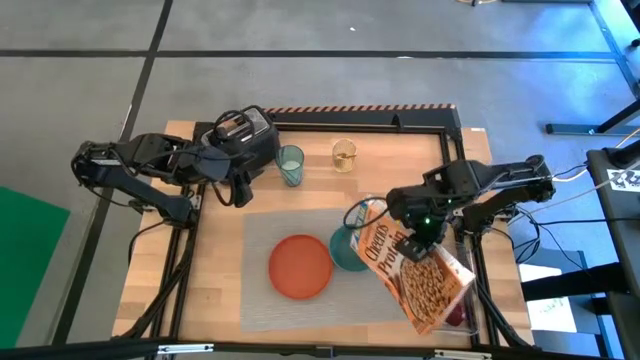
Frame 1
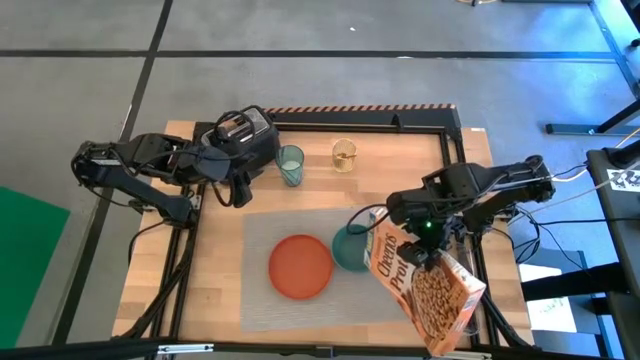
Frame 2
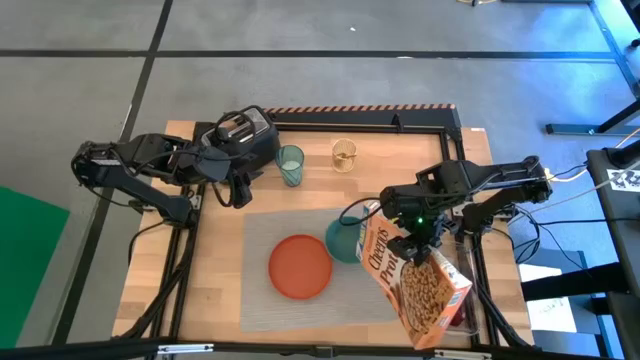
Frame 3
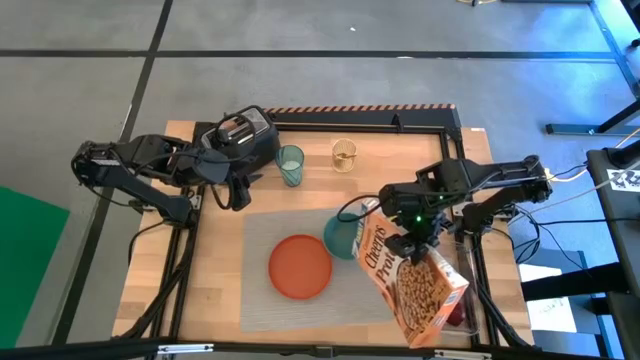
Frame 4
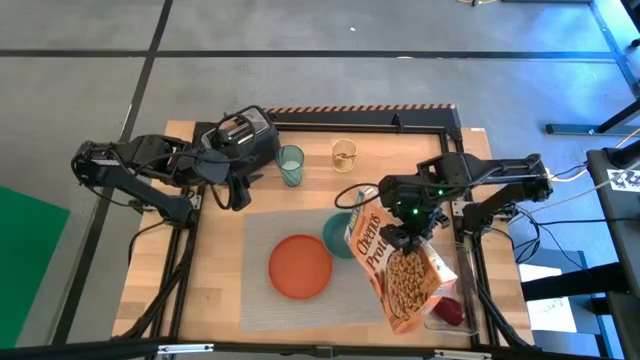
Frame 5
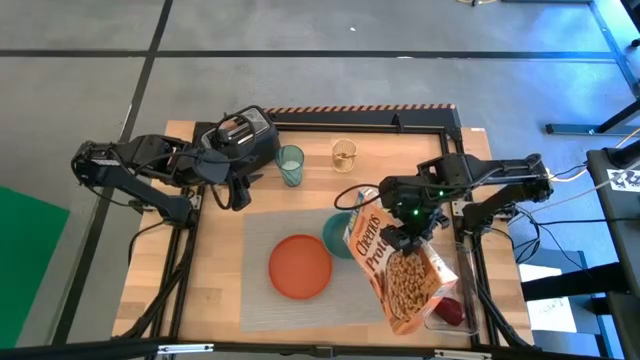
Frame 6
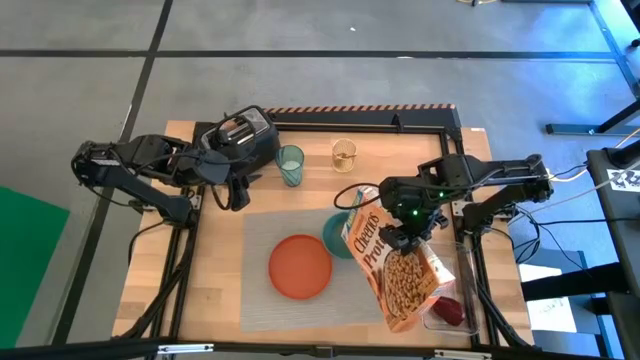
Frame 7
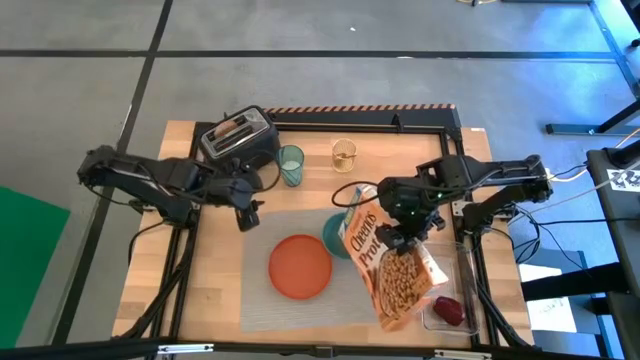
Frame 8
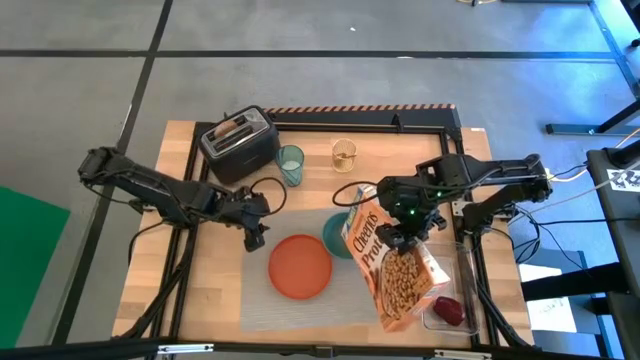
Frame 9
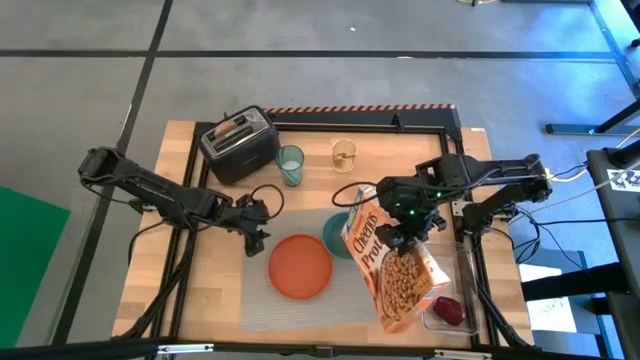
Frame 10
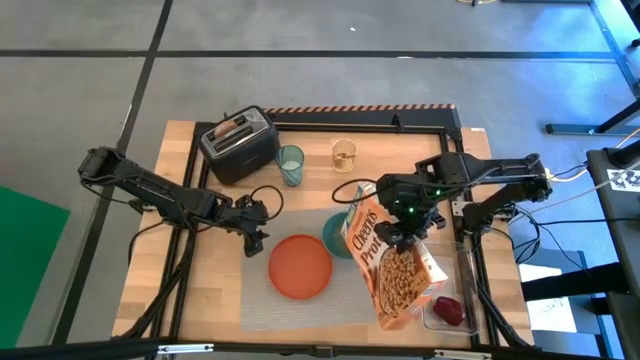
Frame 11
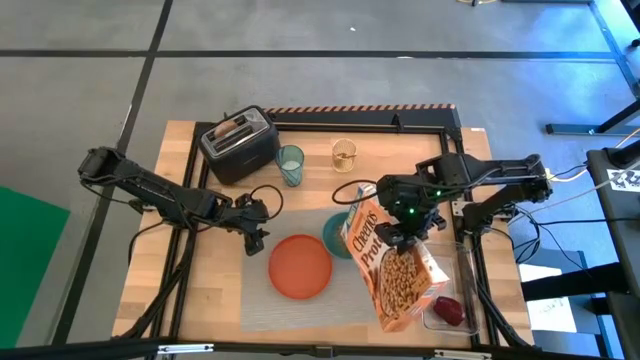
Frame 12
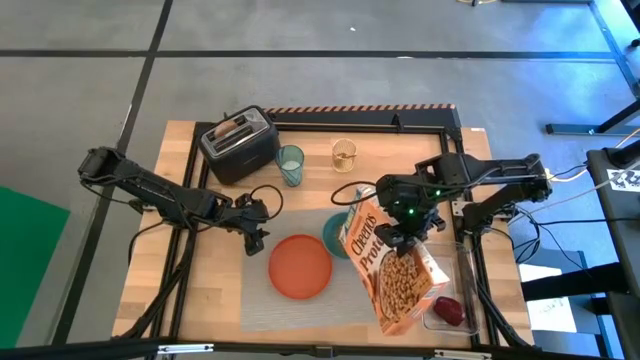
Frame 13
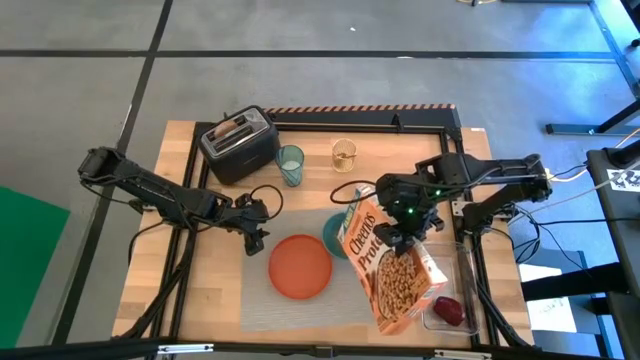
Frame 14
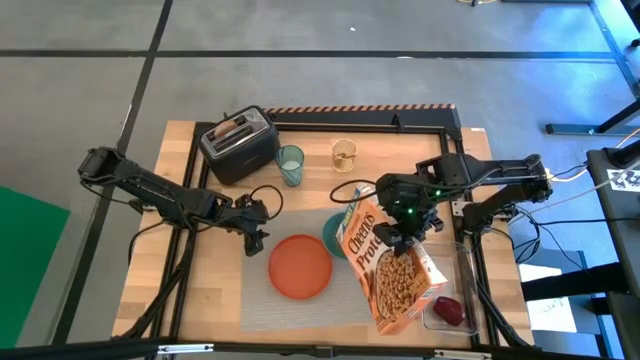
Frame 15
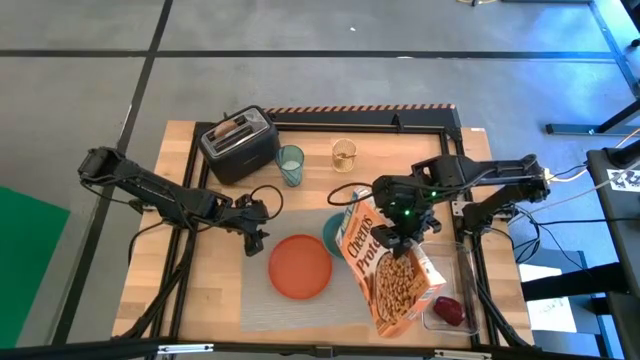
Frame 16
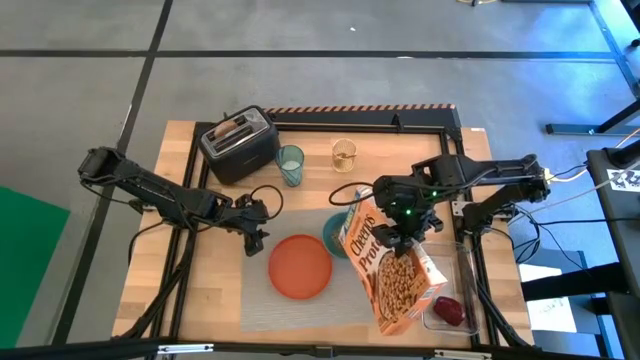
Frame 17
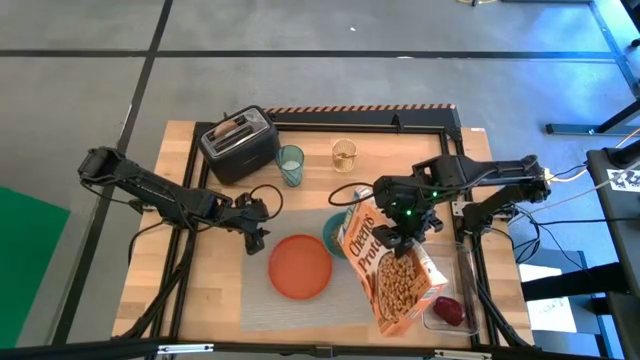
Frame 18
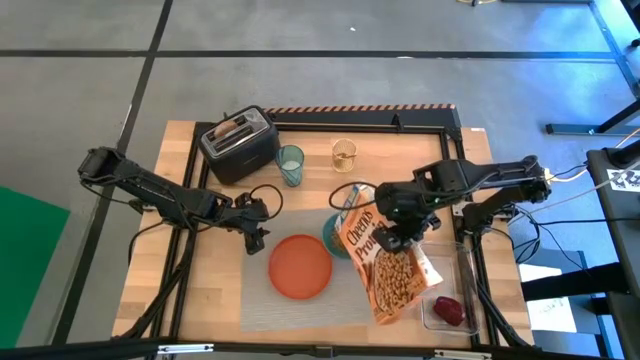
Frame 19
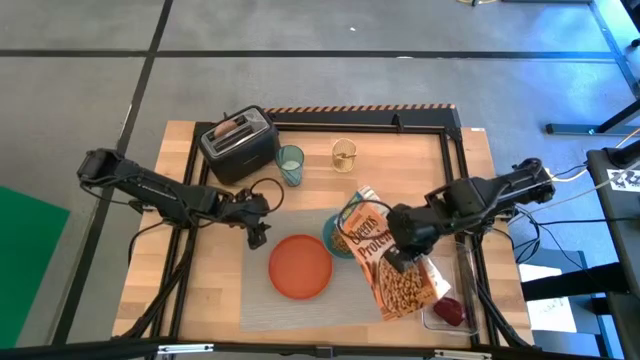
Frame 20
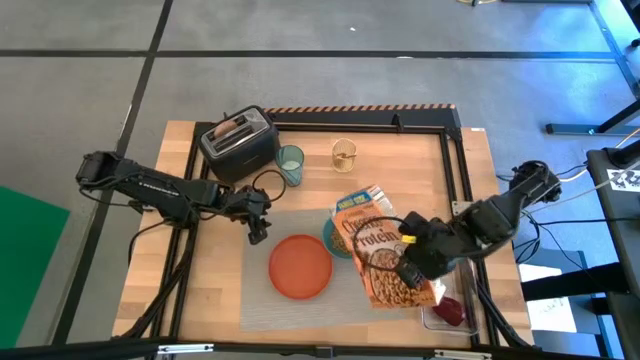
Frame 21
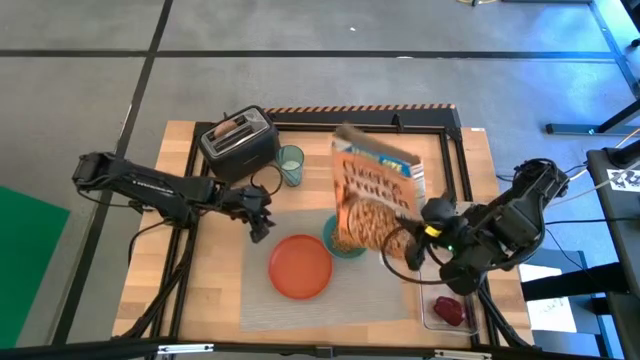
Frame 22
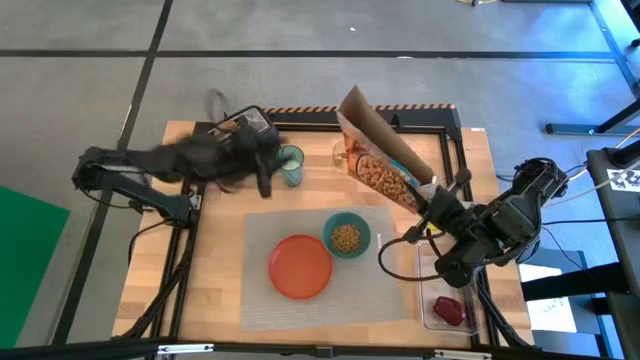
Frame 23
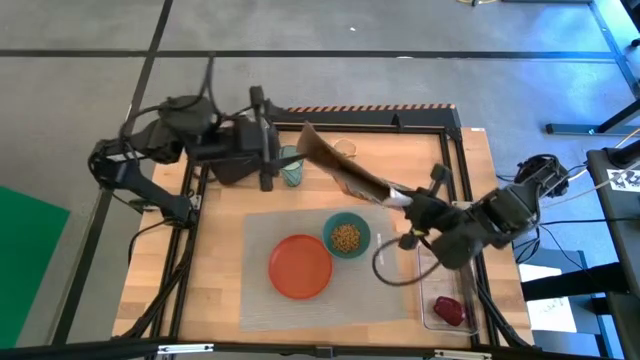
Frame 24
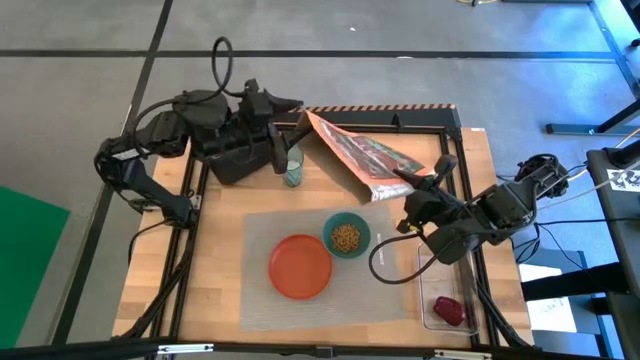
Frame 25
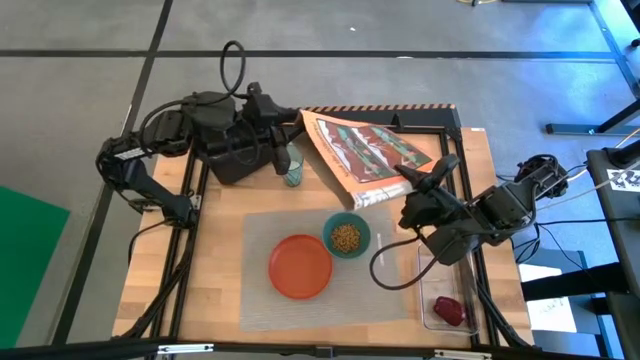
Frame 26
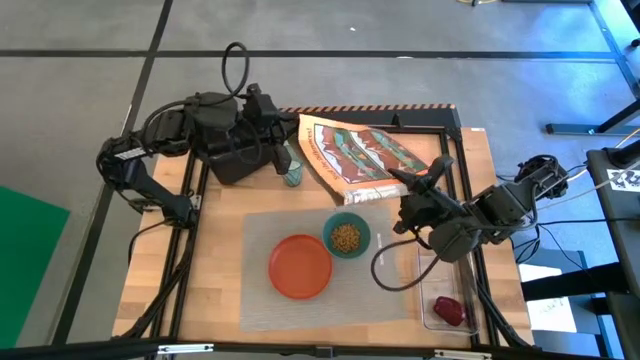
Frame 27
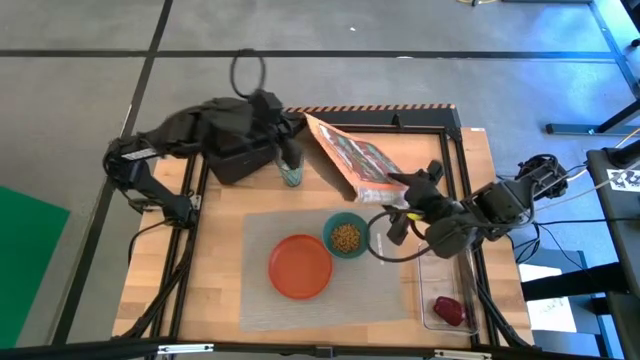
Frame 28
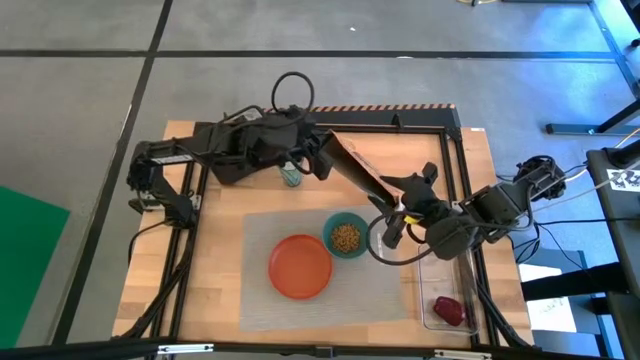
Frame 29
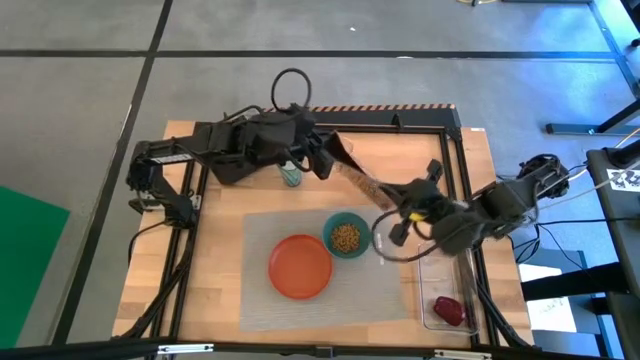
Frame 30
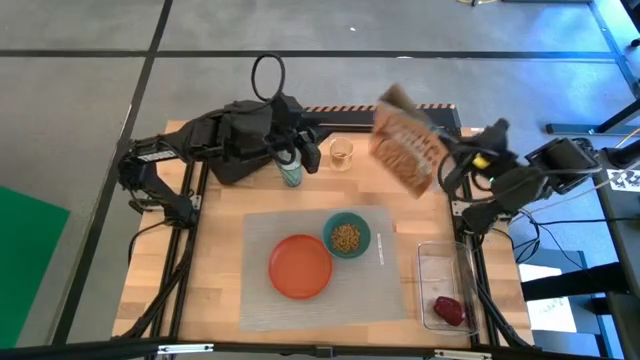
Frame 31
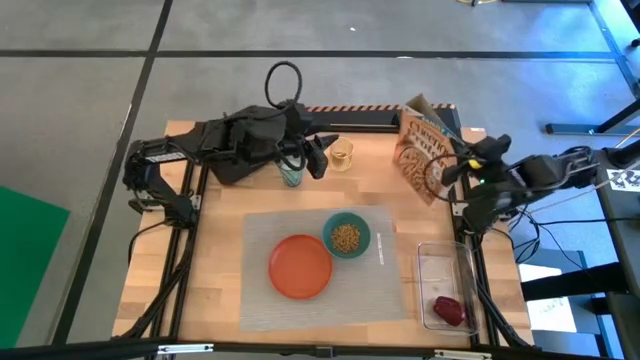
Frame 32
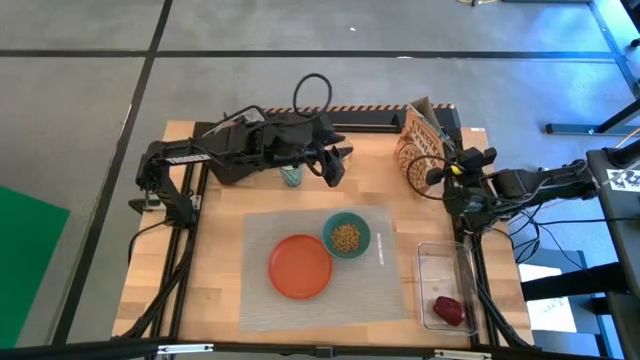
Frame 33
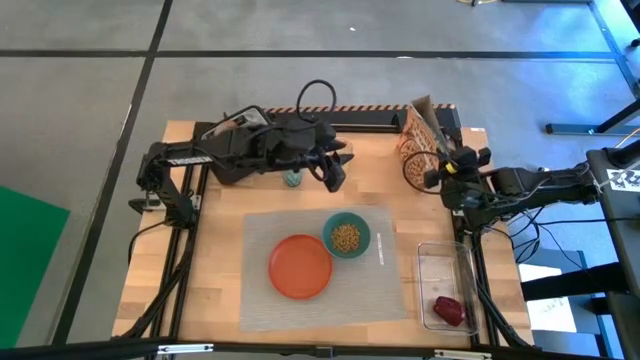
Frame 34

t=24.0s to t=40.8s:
Task: Arrange a breakfast setting
Pour the cereal in the bowl

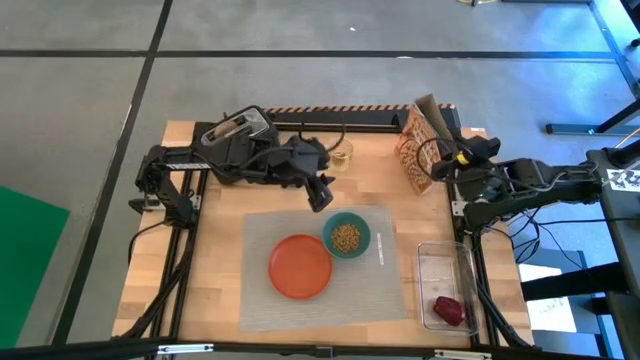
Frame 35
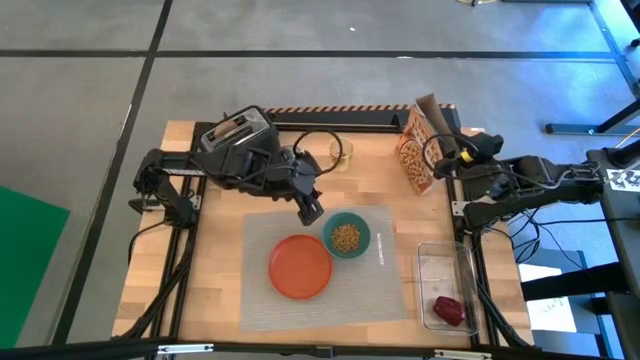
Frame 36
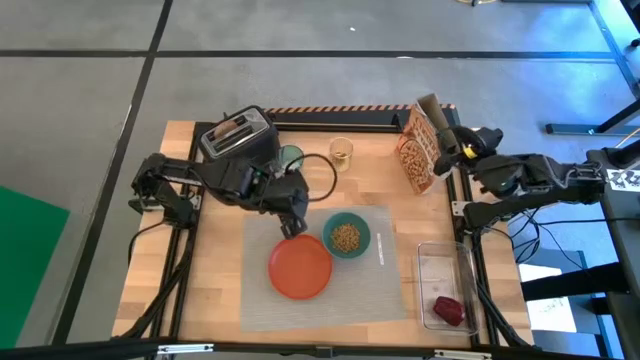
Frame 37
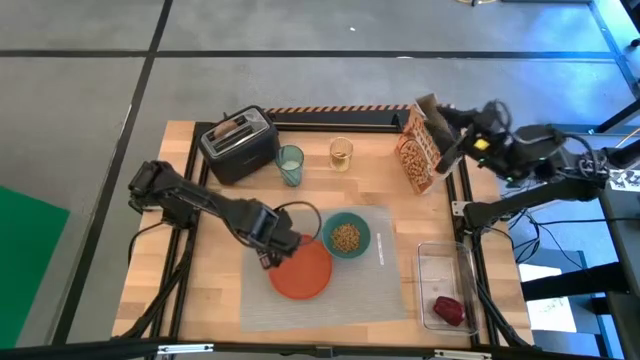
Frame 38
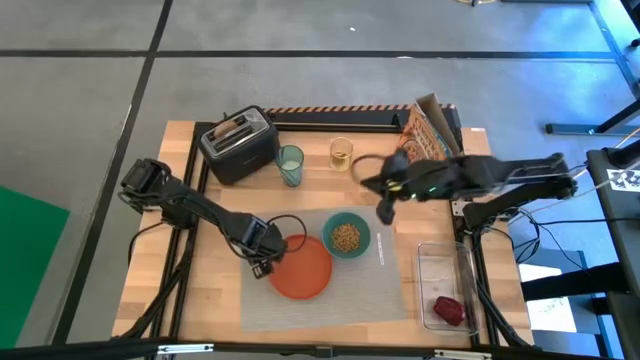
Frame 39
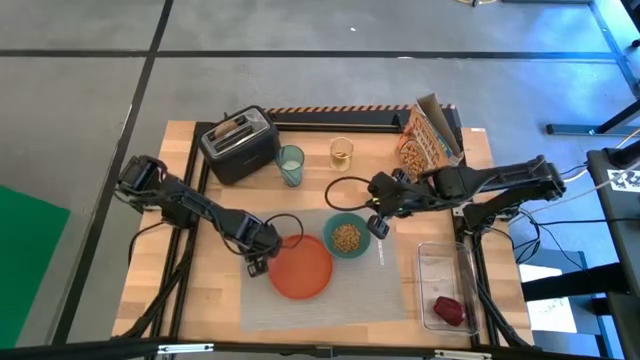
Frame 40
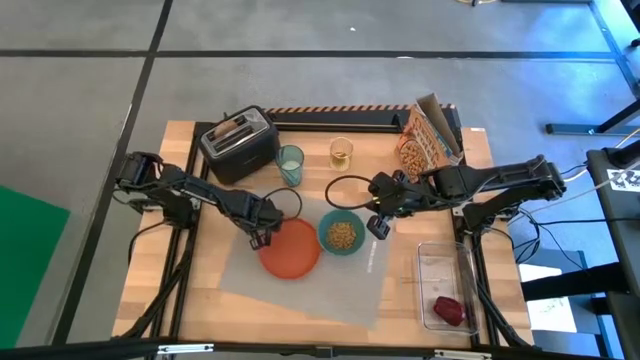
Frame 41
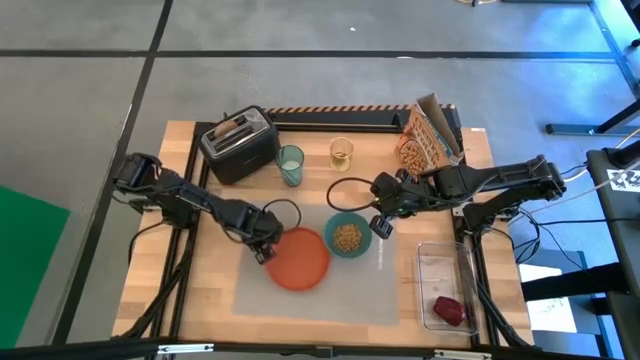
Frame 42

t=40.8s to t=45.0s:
Adjust the placemat
